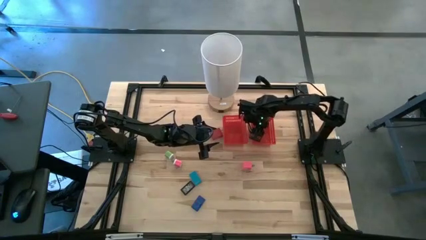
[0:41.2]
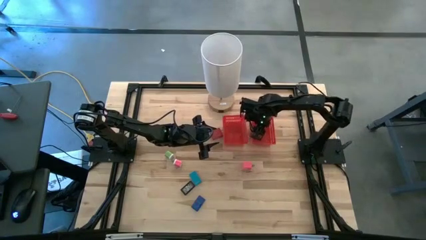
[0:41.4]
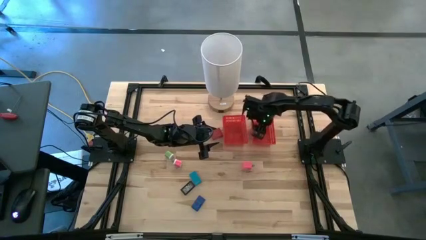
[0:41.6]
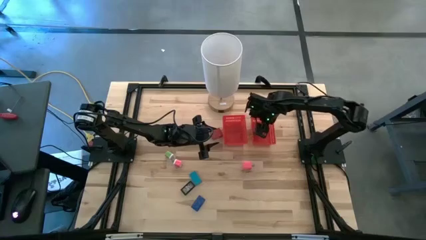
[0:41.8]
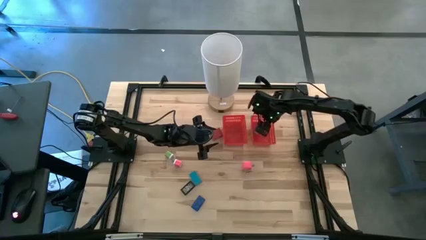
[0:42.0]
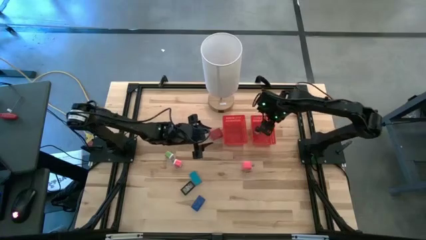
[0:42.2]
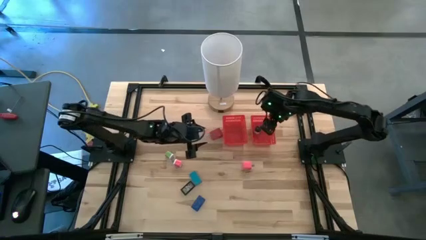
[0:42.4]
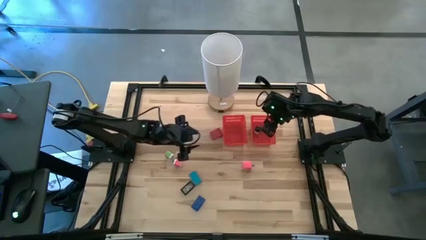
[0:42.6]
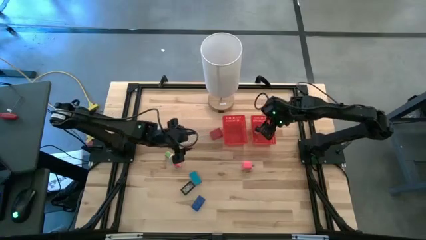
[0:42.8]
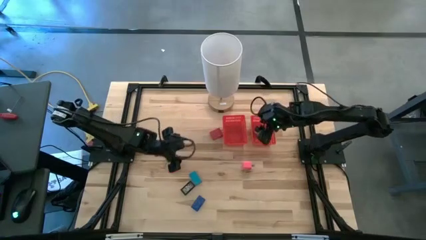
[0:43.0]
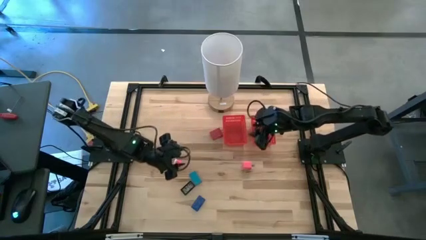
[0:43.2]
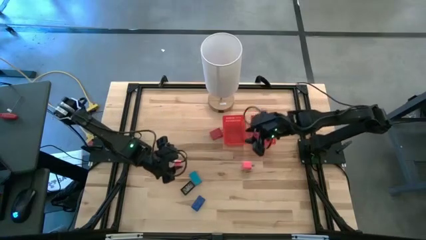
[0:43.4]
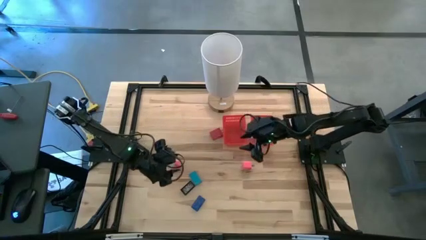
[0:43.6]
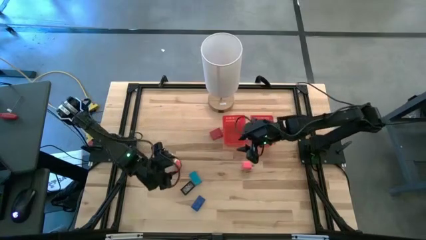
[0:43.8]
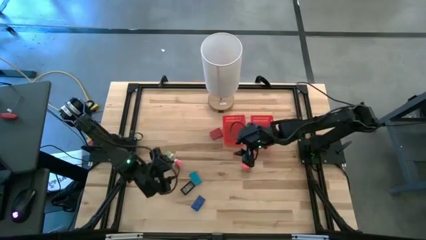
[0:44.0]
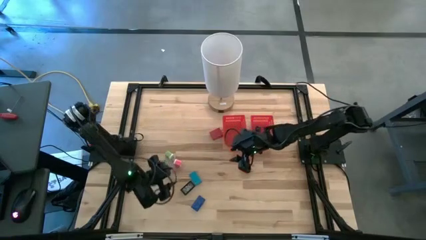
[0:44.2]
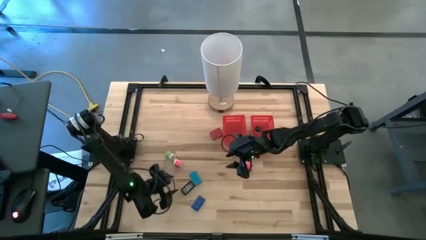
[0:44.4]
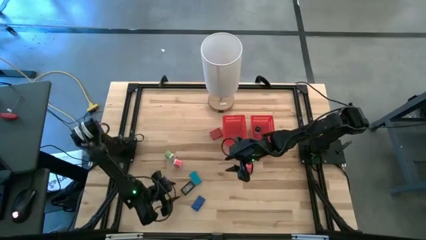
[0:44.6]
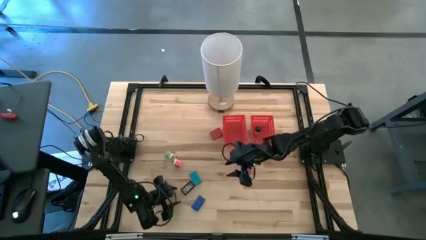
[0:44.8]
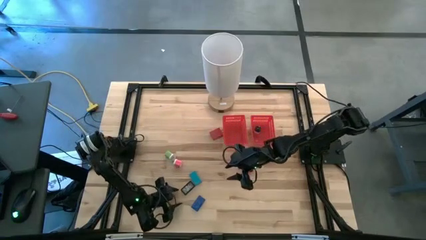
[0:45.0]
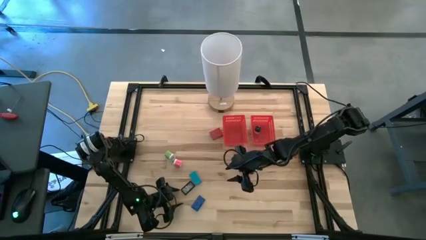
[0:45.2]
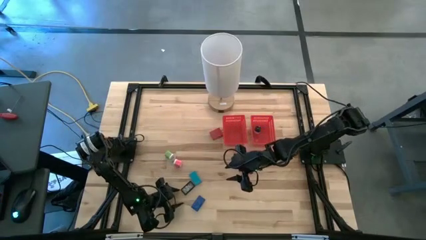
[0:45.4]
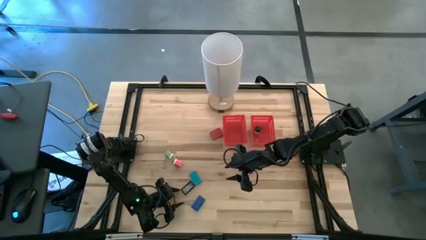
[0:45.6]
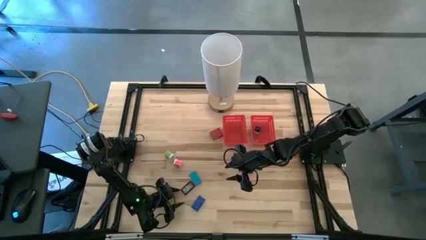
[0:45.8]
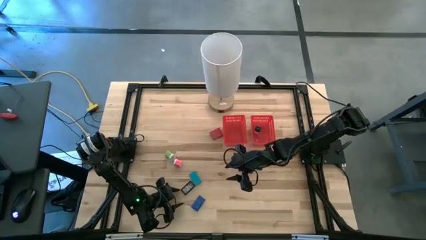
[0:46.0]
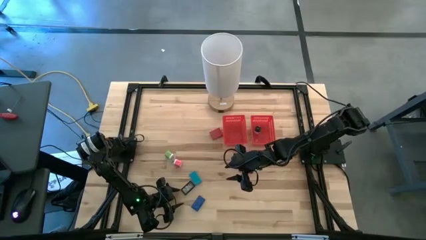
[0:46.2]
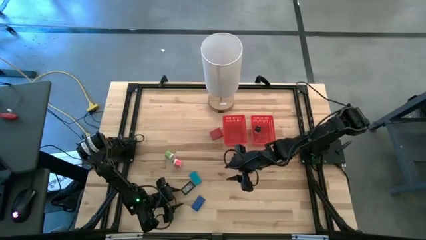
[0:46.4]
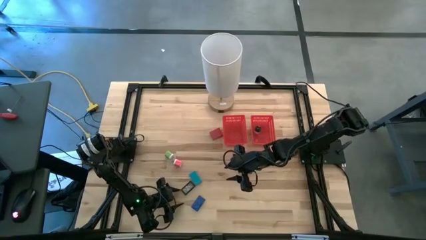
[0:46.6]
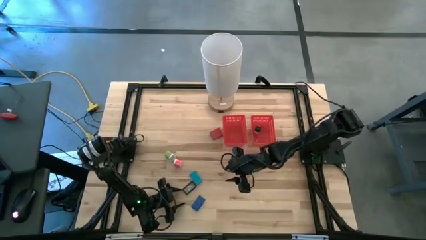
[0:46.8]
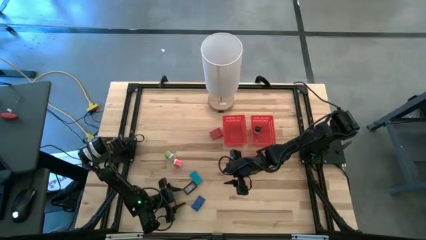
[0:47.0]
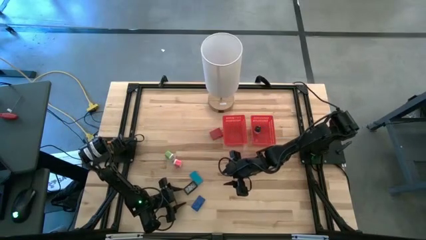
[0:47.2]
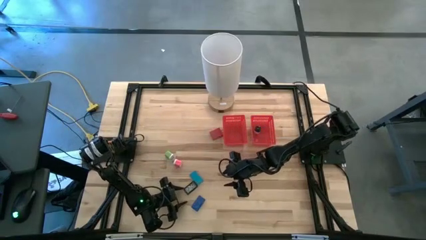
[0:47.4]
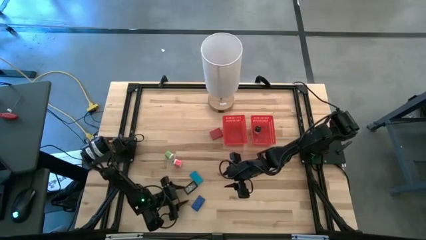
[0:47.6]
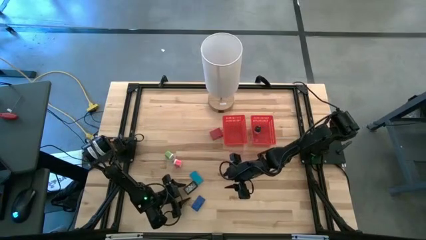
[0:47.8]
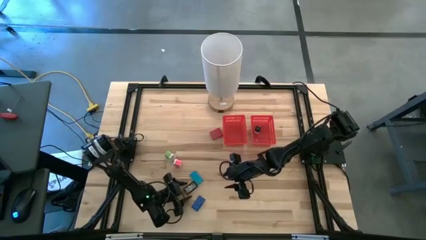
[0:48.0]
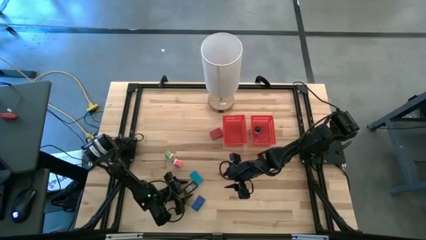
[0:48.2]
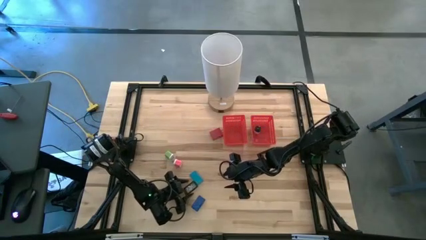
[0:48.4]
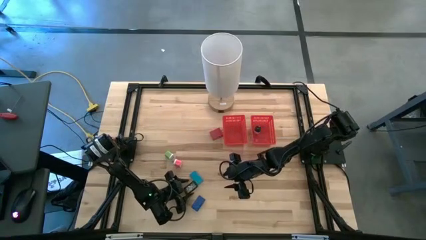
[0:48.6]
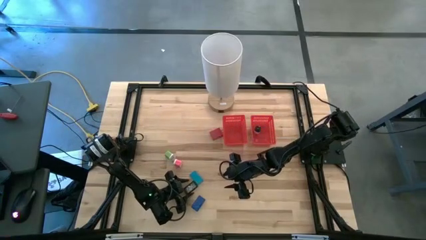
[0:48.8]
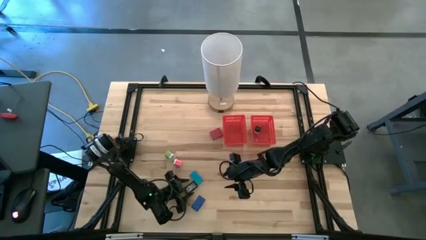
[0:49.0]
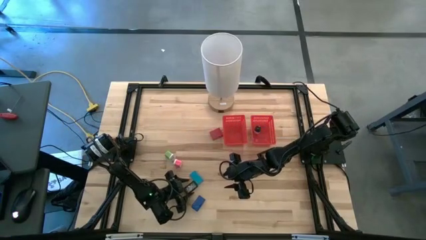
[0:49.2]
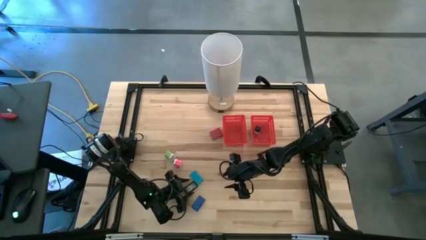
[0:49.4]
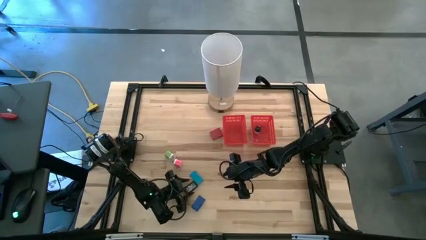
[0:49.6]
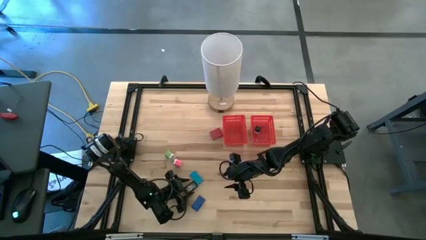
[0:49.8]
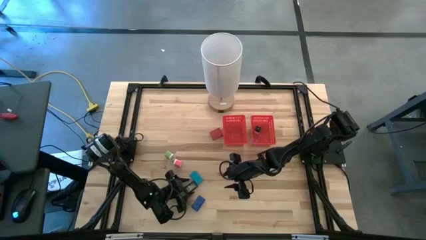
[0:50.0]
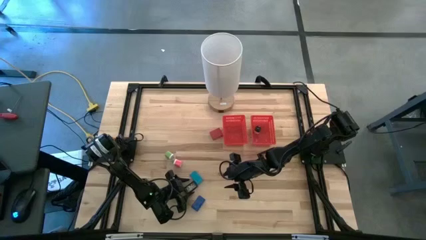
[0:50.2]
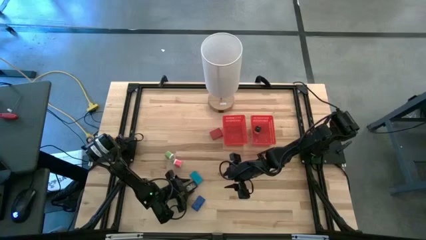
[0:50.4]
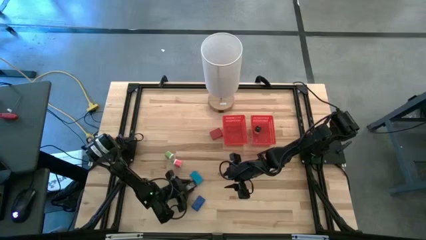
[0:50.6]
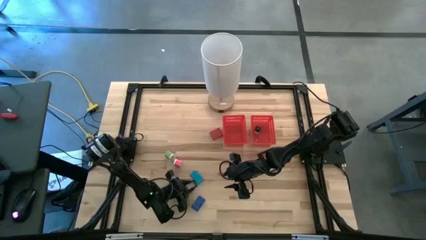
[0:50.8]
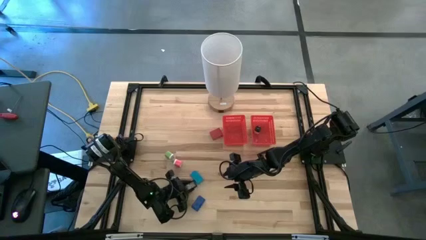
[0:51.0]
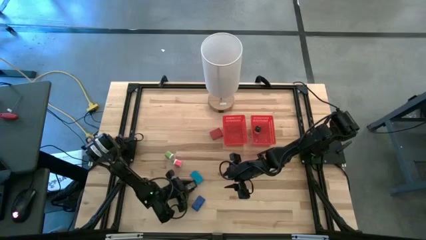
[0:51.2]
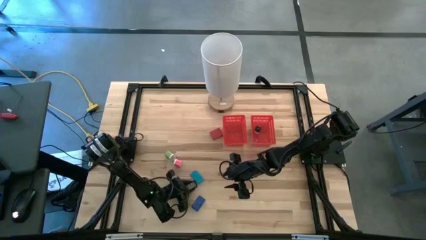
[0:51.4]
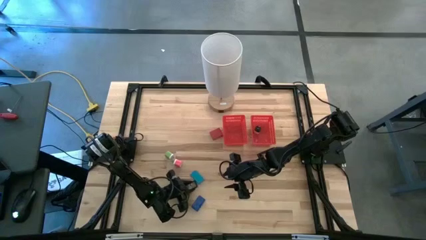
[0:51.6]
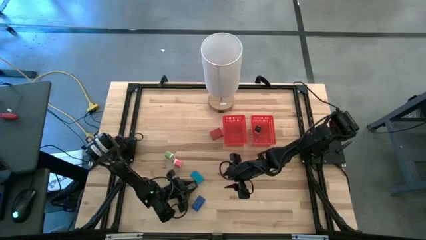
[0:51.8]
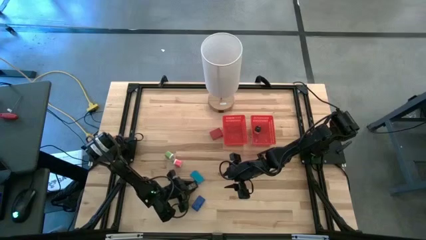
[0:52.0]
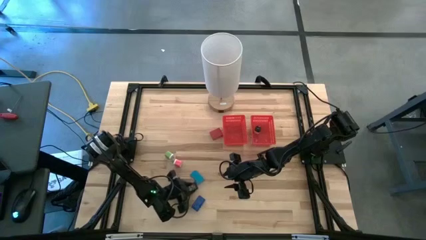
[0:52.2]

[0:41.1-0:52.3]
Task: Pick & Place Office items
Put the black timer into the left red bin

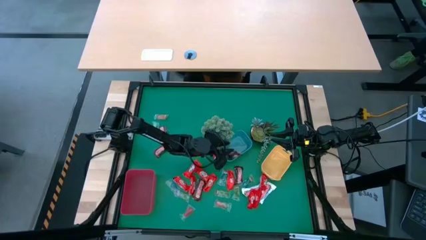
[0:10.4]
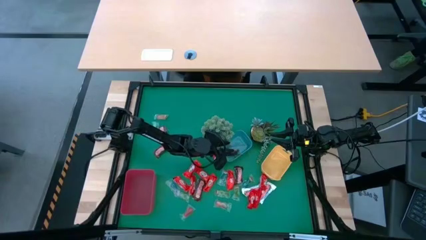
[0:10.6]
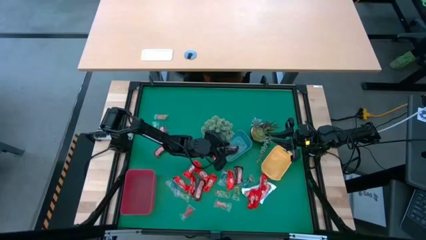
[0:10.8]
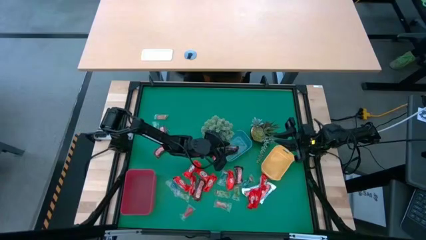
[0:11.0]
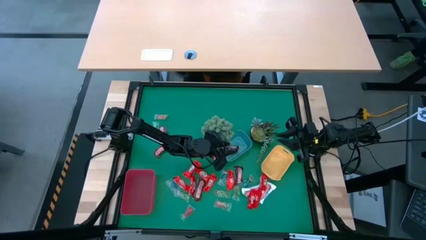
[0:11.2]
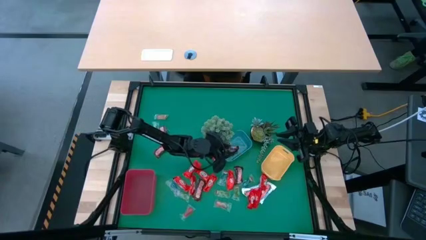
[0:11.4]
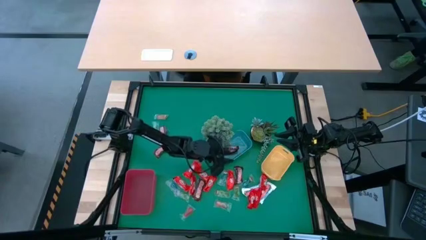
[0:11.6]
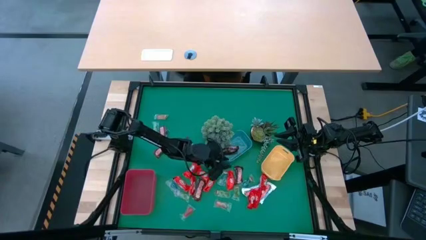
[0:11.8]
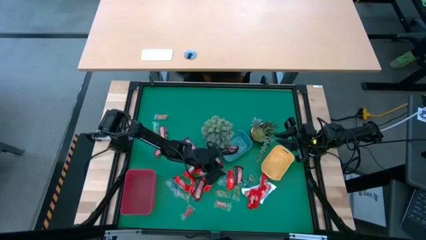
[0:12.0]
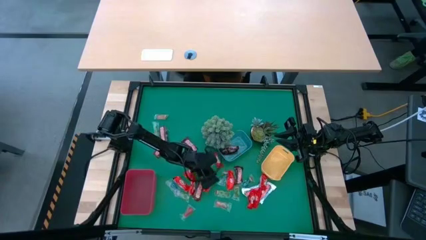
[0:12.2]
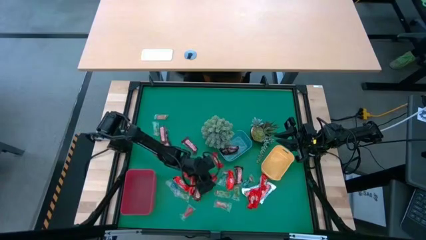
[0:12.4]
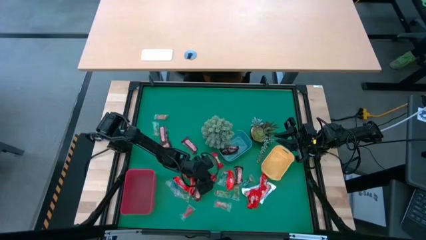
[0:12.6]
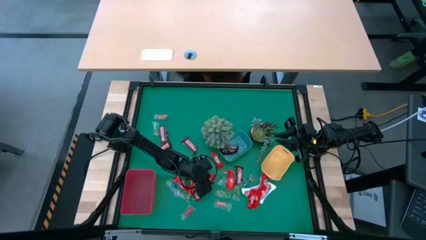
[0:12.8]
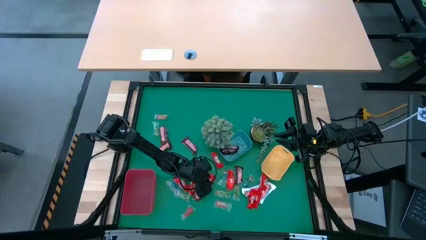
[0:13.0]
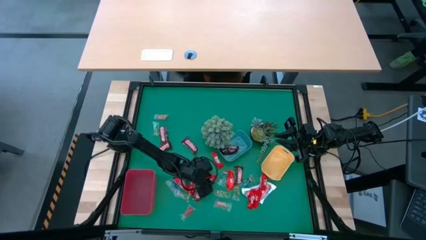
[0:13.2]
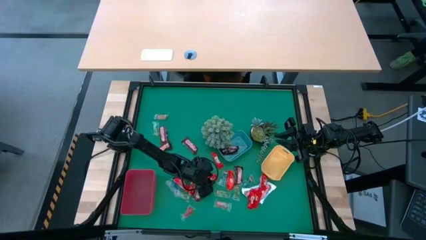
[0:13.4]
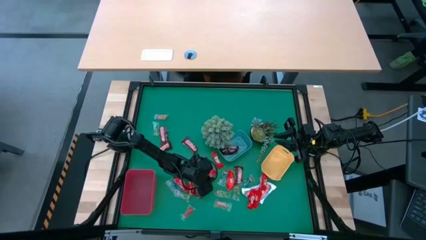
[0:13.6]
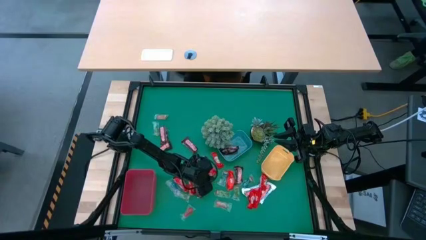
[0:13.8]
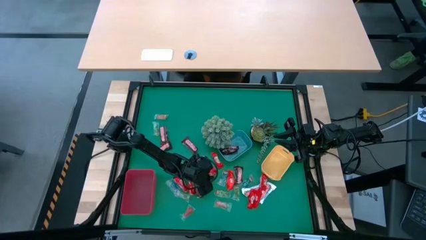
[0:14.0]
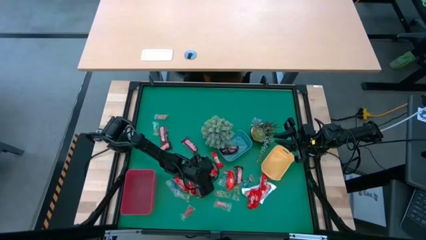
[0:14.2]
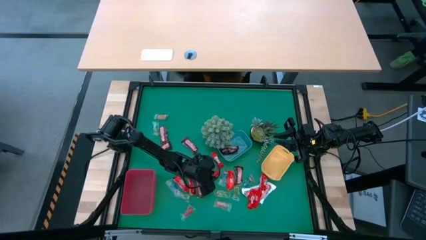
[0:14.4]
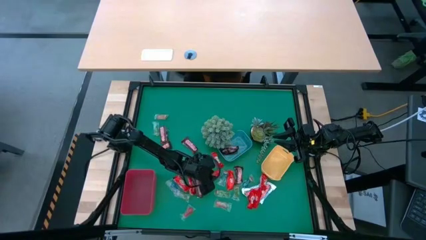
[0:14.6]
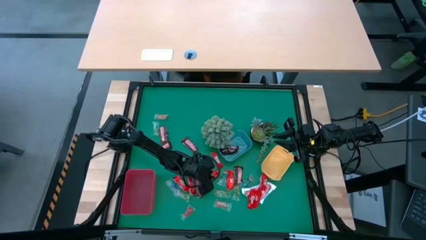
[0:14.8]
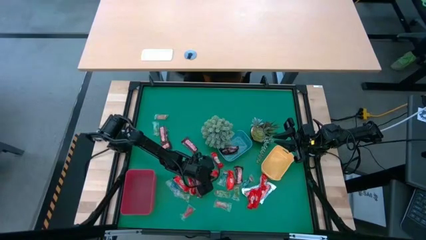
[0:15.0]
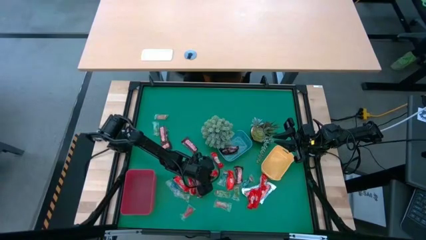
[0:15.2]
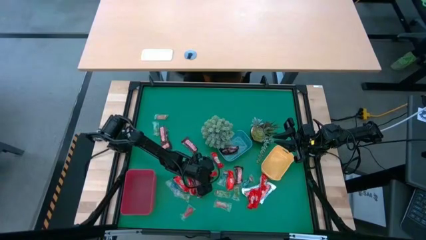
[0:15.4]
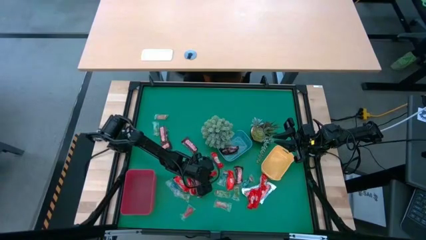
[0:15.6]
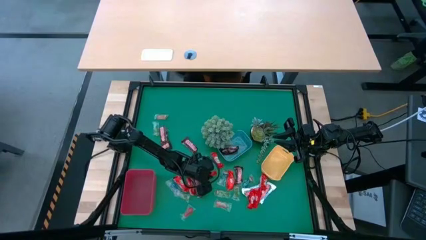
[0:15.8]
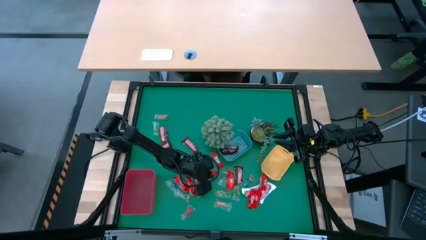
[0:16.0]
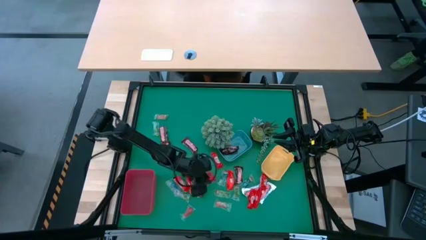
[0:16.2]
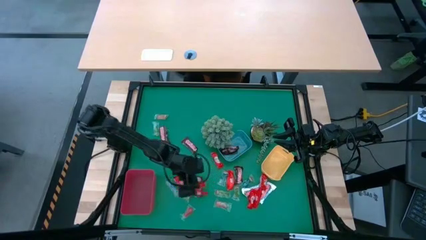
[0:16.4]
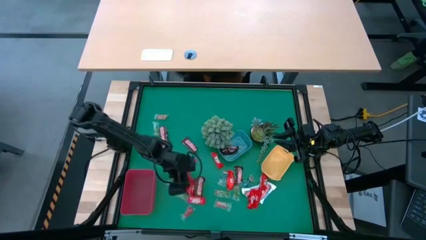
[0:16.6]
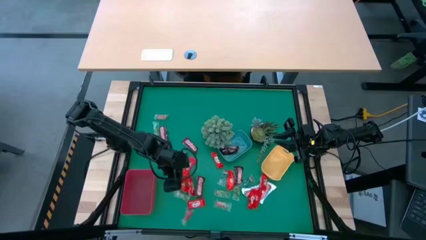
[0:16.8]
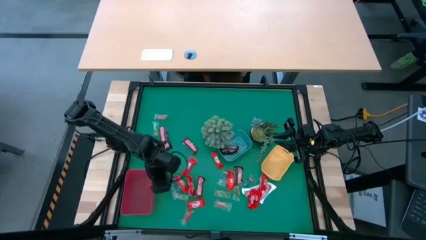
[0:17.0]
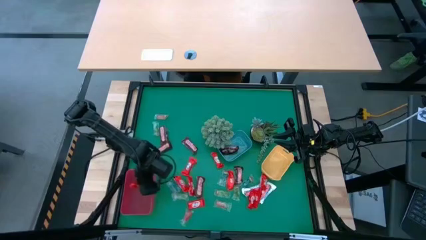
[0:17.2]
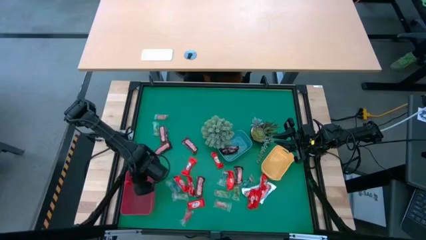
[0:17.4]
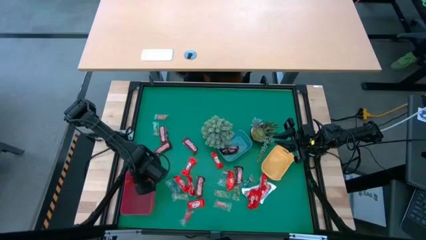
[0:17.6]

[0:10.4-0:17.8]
Task: Organize candy in baskets
Put the red chocolate into the red bin
